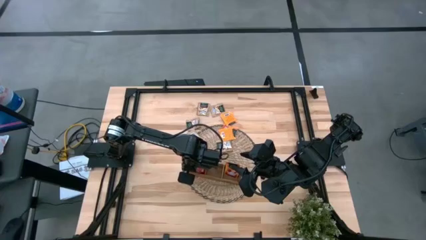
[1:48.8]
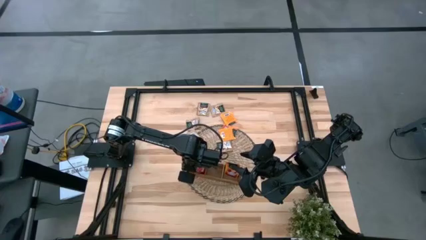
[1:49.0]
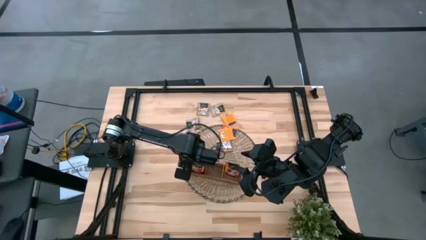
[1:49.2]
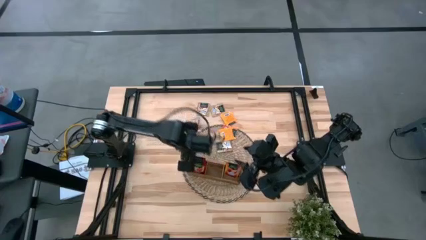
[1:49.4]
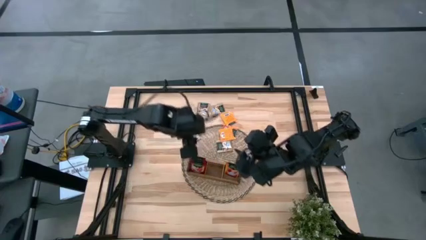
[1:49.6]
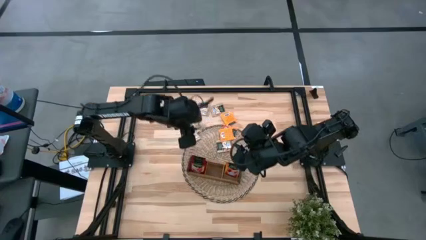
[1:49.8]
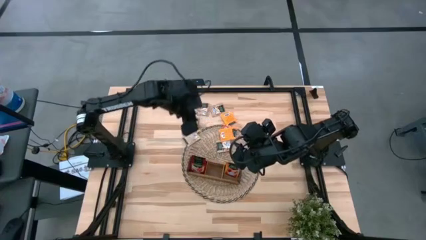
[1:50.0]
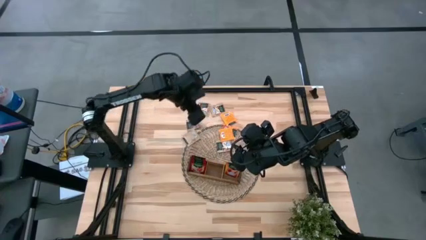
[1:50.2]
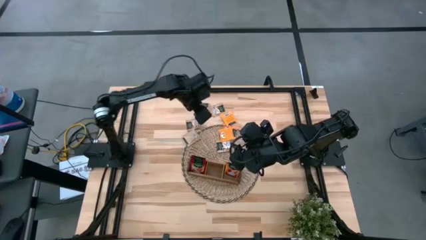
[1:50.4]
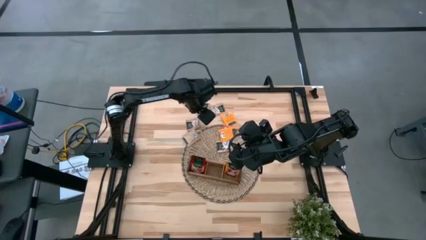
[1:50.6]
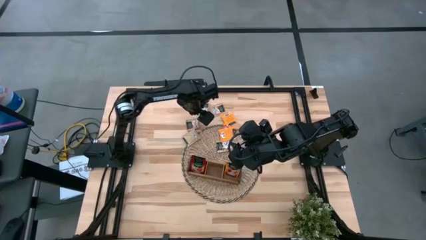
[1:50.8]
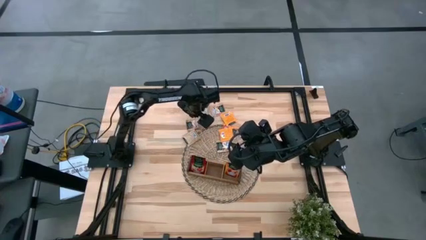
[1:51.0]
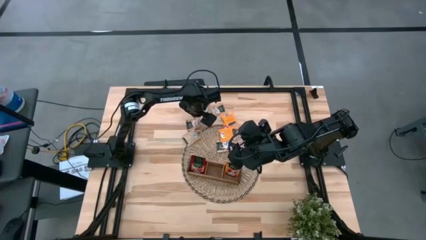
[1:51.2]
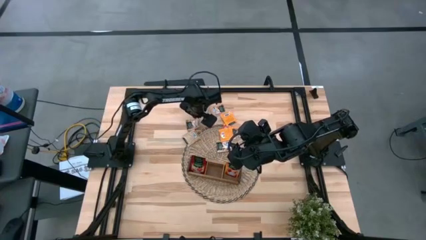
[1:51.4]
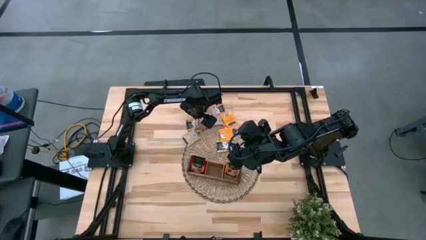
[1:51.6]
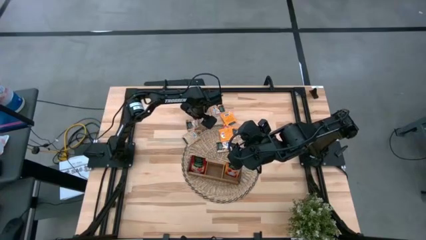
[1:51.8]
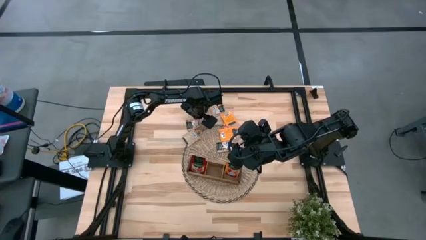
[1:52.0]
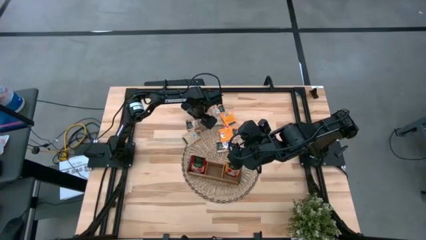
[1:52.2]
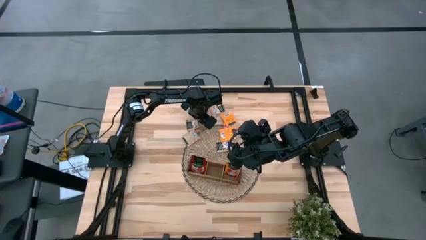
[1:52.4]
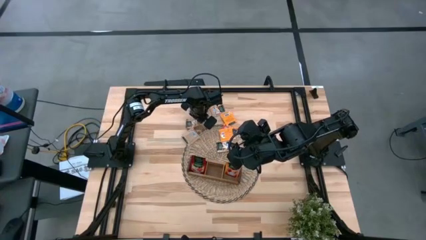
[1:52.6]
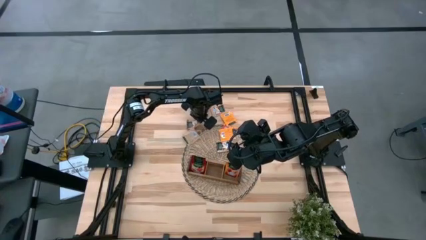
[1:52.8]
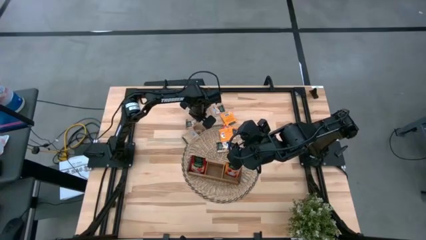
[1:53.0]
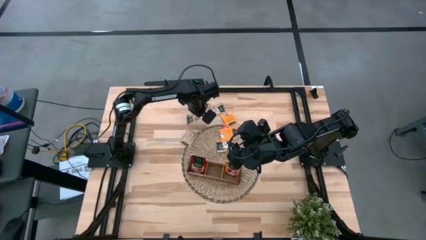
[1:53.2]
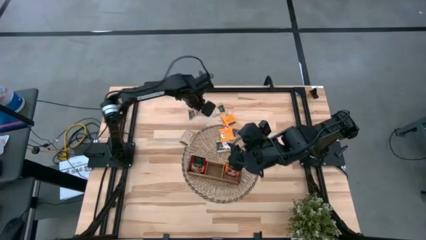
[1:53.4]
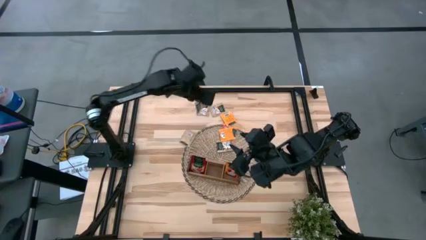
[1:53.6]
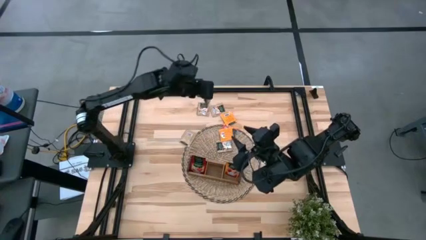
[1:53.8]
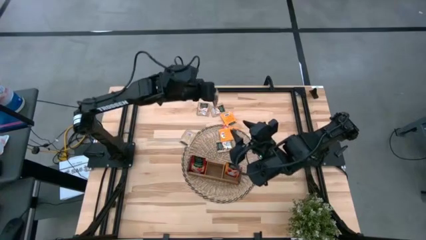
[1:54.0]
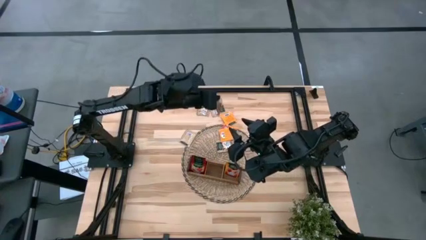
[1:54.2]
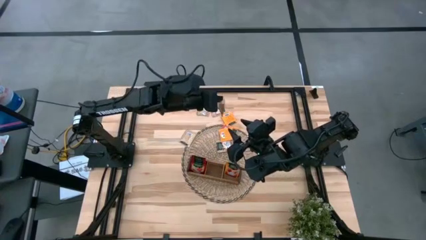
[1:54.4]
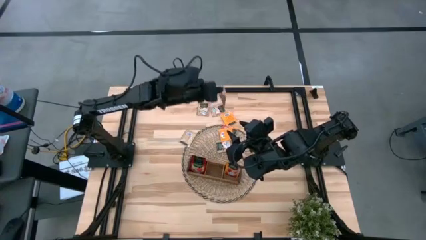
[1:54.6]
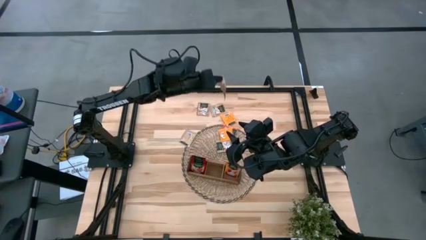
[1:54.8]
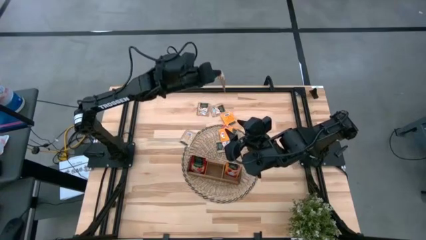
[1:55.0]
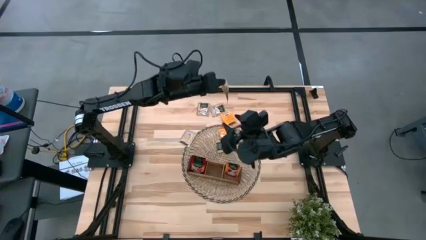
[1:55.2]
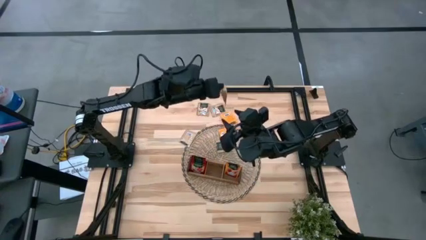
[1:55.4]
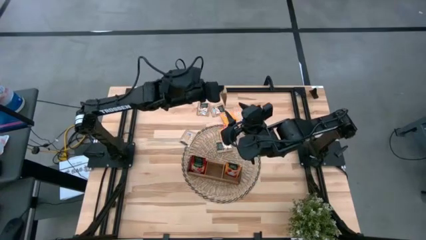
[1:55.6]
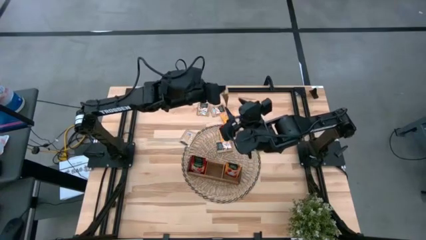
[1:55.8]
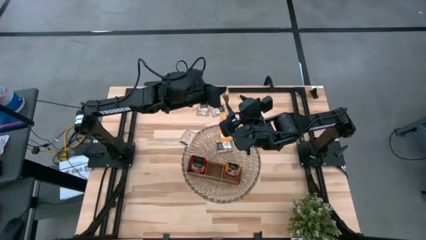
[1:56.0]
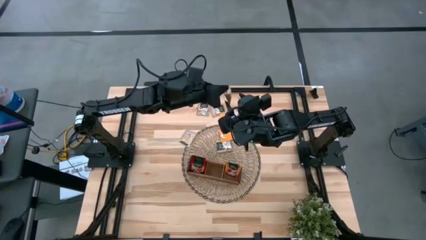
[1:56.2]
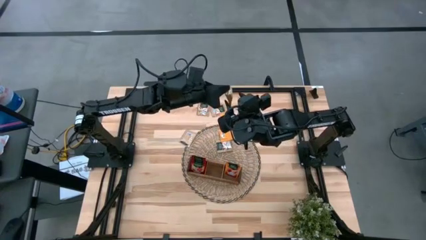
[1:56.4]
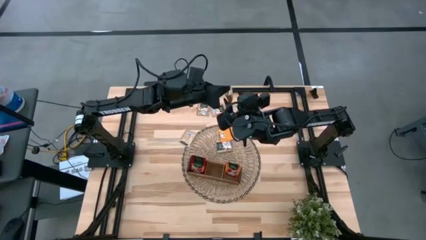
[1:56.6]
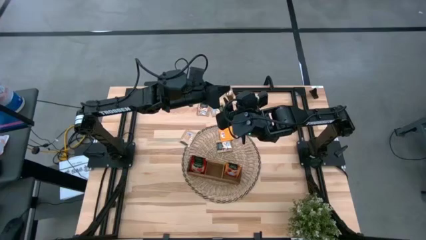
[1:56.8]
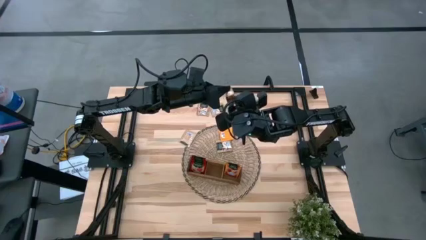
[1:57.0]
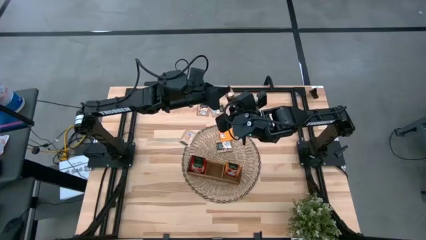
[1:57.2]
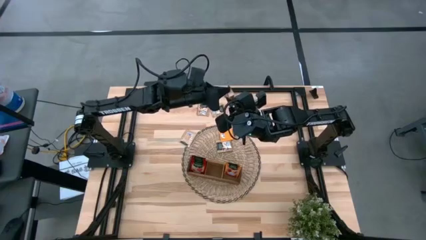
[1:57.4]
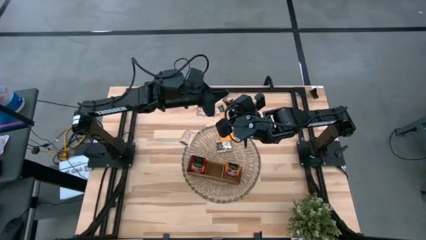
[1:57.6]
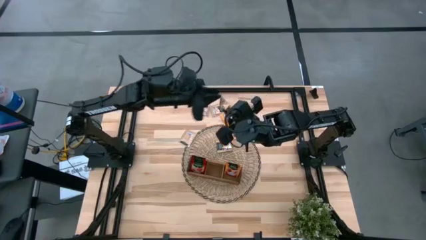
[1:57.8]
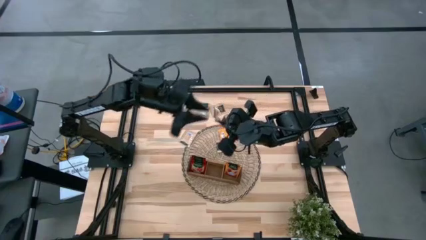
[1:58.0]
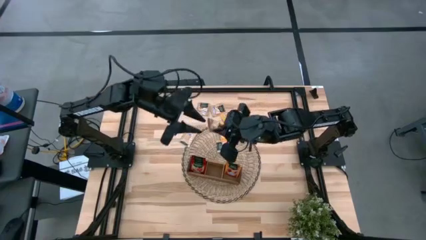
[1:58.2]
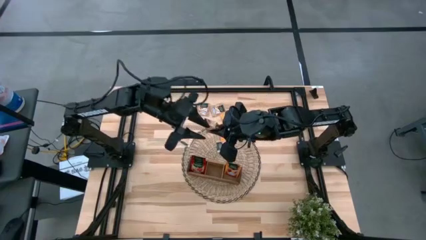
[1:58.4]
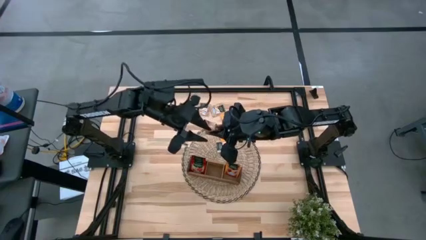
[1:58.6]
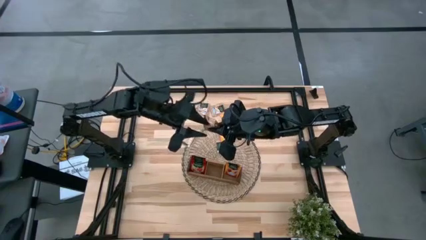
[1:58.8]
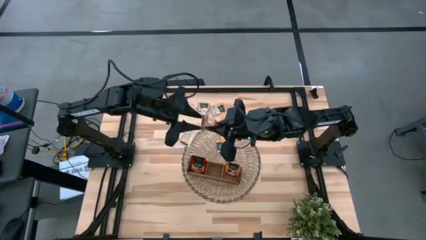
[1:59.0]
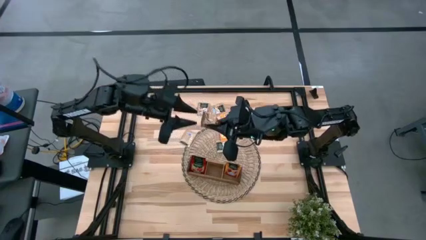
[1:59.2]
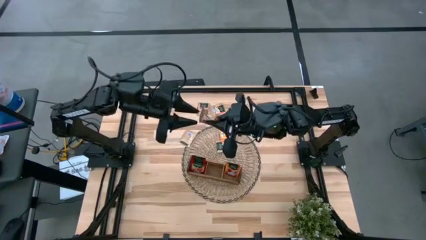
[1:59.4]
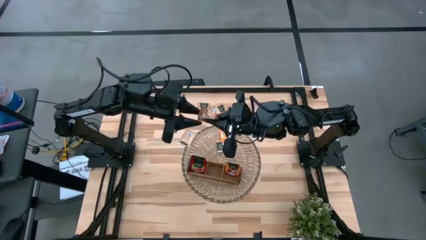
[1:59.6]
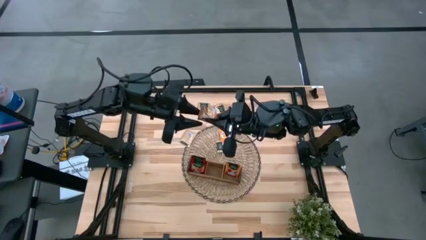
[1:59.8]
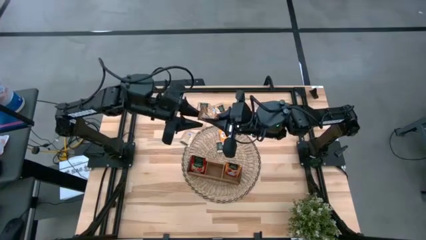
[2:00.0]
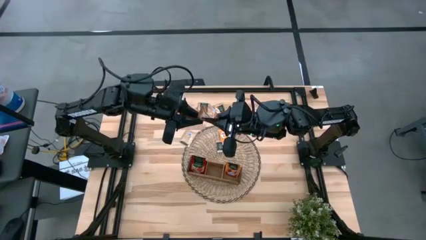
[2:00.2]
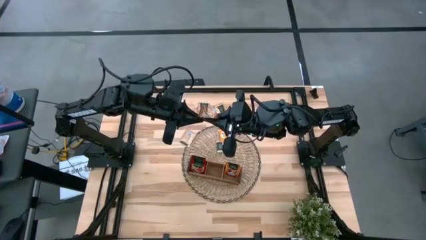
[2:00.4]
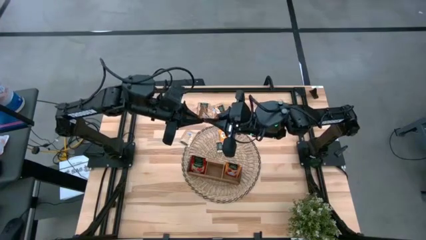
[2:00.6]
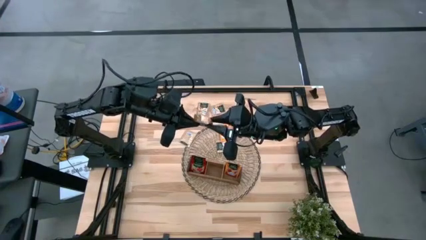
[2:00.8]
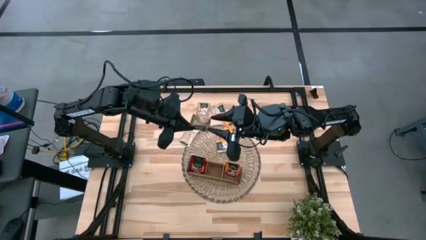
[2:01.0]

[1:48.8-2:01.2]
Task: Pick & Place Tea
Put the brown tea bag into the middle section of the wooden organizer

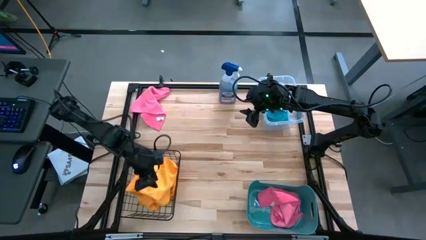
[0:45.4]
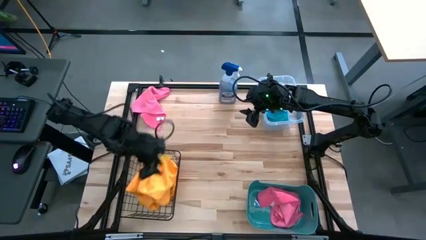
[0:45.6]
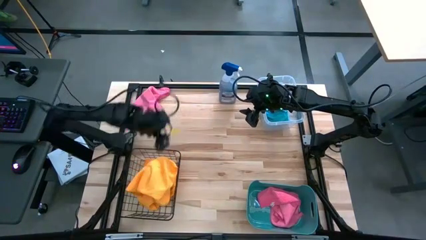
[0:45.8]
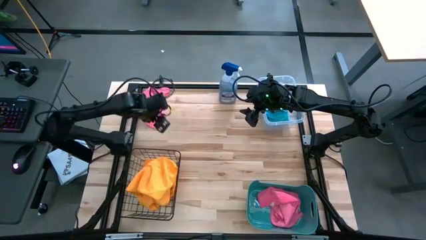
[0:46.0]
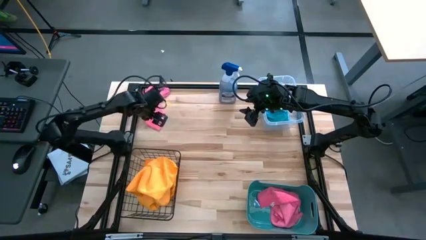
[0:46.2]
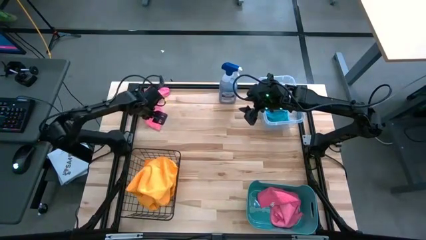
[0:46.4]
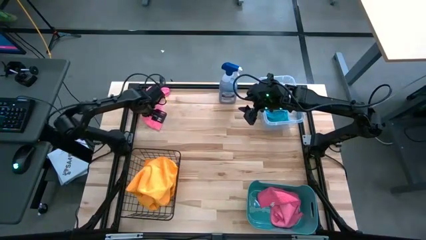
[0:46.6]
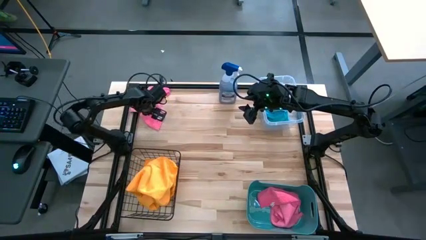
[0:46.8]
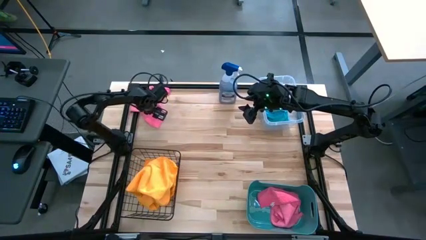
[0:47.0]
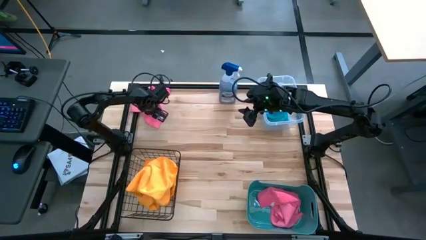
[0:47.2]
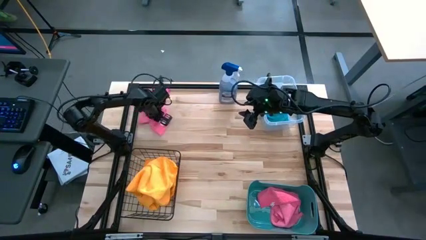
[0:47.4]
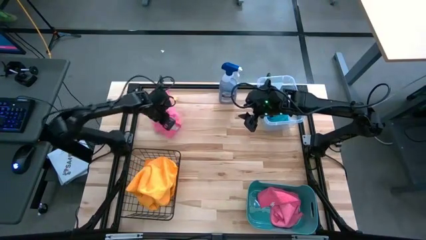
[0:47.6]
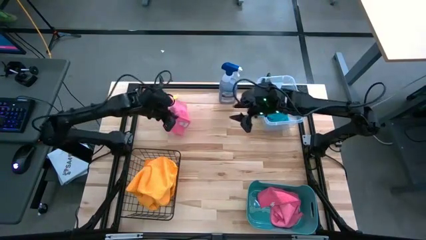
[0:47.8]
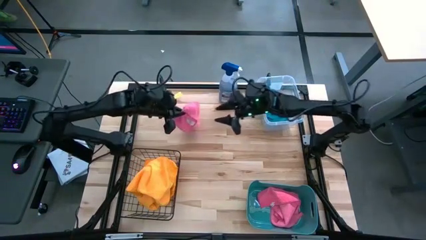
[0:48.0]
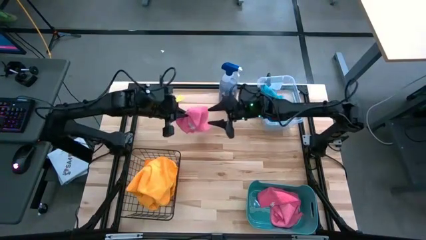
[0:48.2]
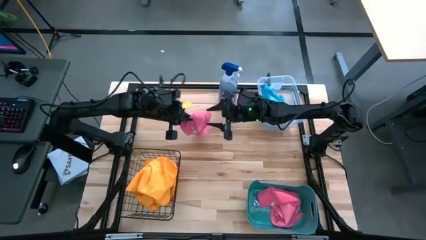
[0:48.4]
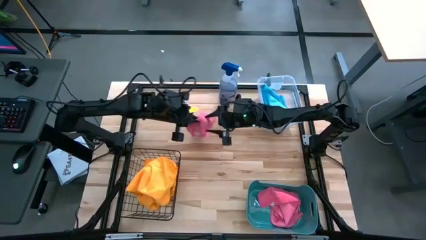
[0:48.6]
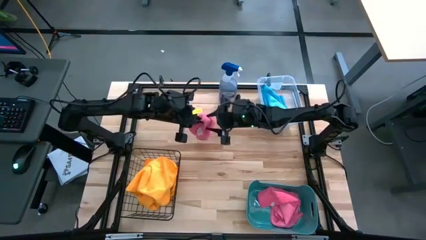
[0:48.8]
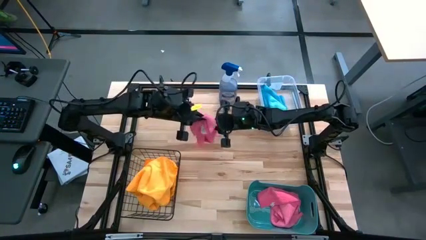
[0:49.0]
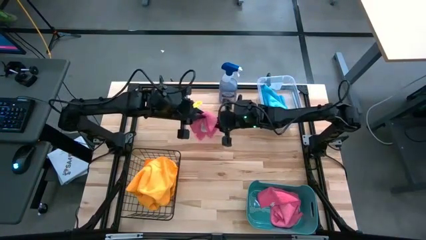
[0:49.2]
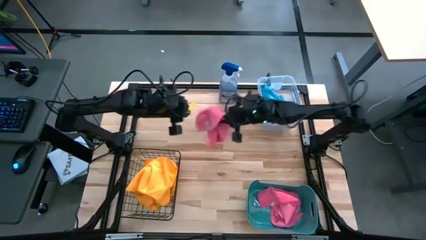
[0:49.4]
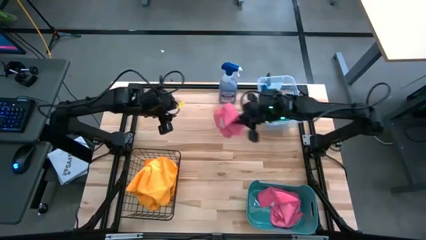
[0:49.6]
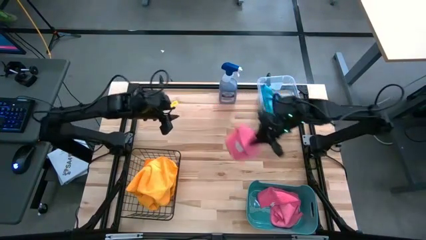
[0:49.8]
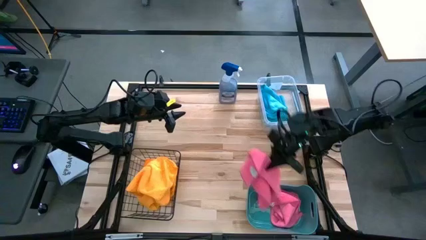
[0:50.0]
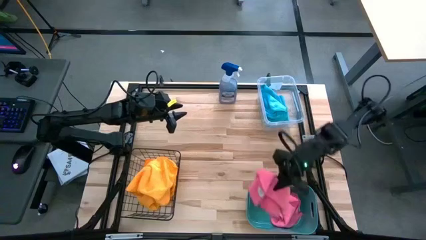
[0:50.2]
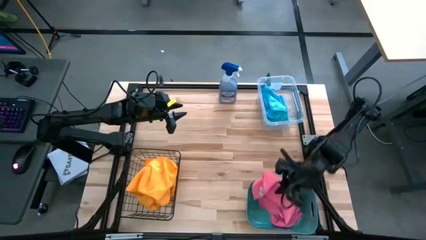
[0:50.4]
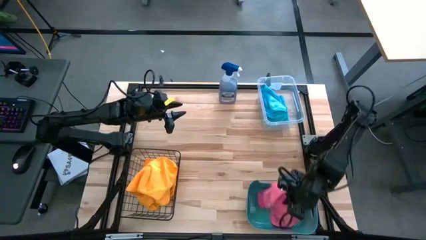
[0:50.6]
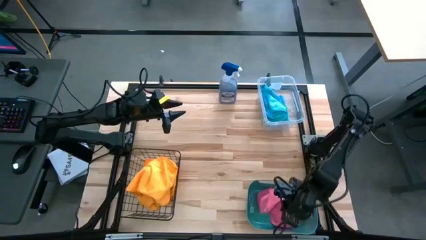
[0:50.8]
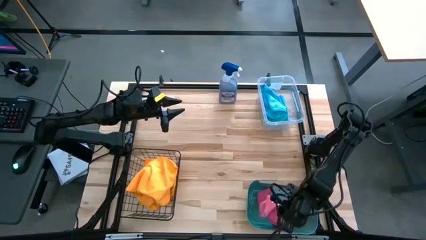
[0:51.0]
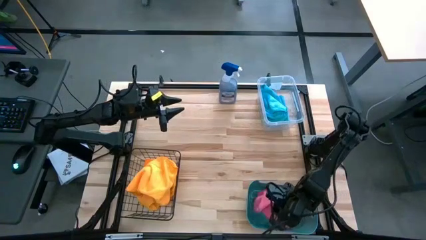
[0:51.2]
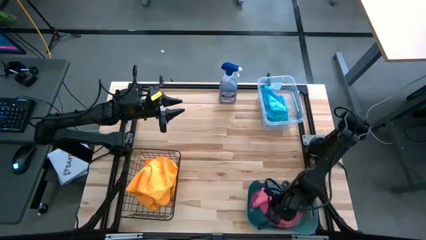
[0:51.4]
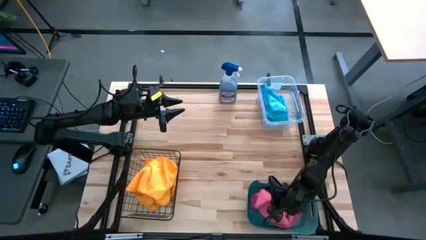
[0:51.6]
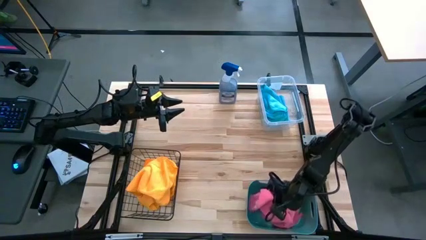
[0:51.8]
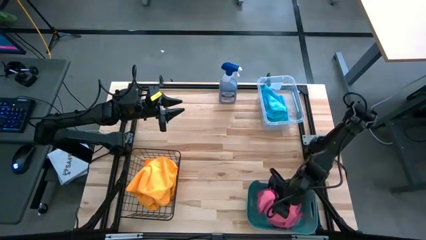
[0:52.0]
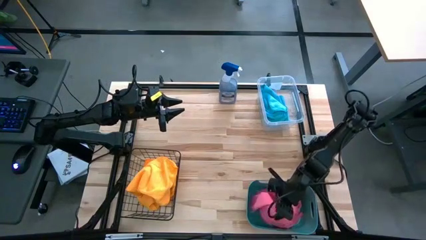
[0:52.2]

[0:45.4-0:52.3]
Task: Sort microfiber towel by color & place in baskets
Put the pink microfiber towel into the green bin
